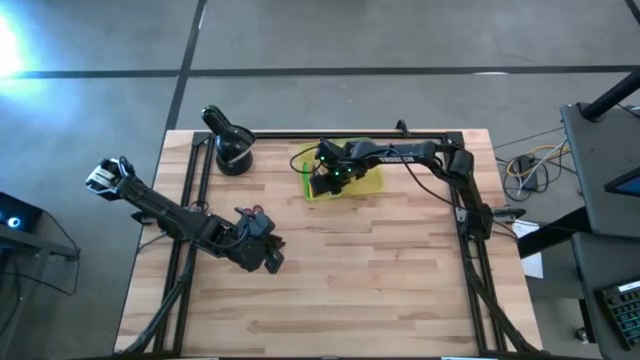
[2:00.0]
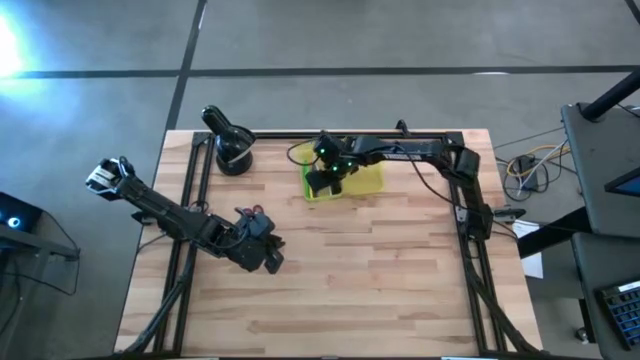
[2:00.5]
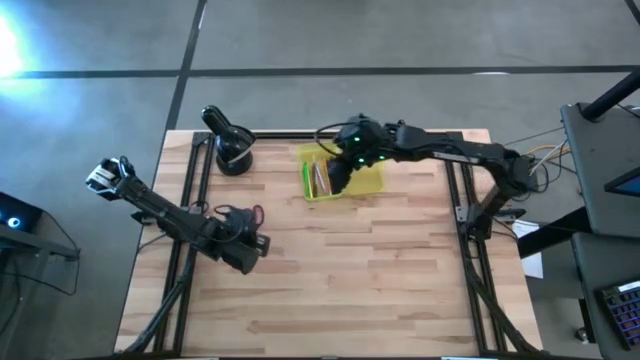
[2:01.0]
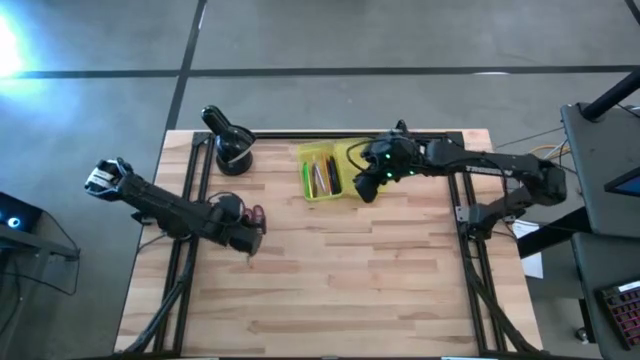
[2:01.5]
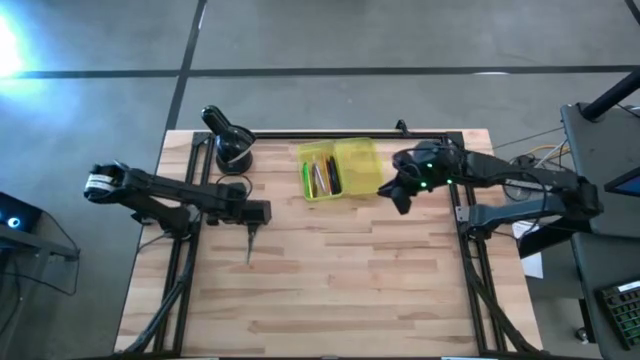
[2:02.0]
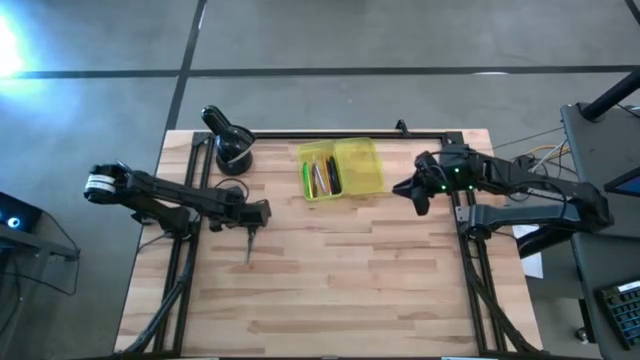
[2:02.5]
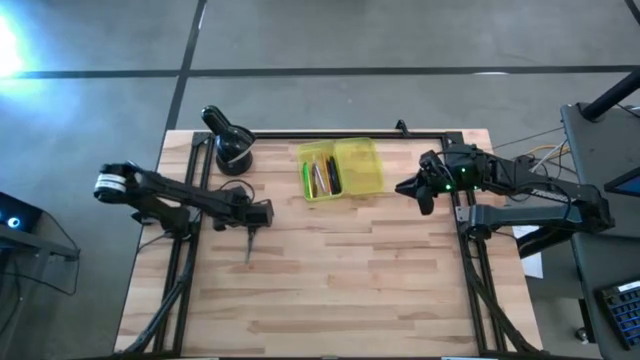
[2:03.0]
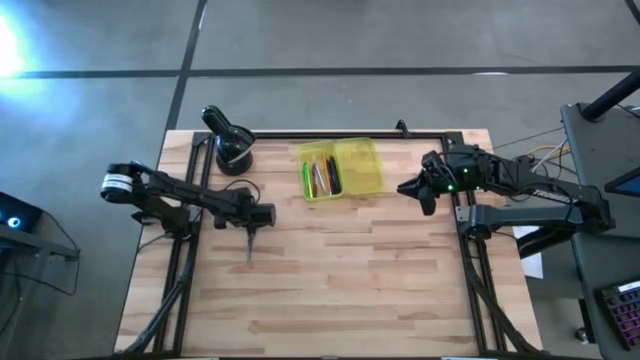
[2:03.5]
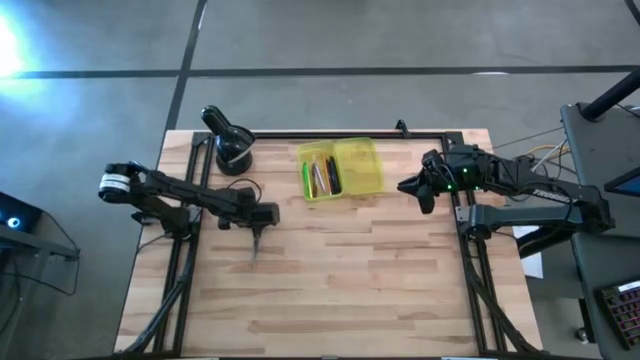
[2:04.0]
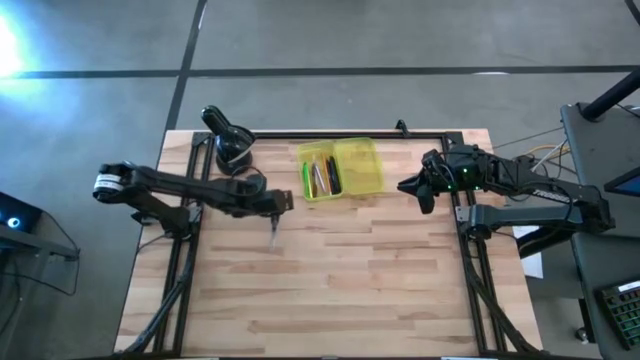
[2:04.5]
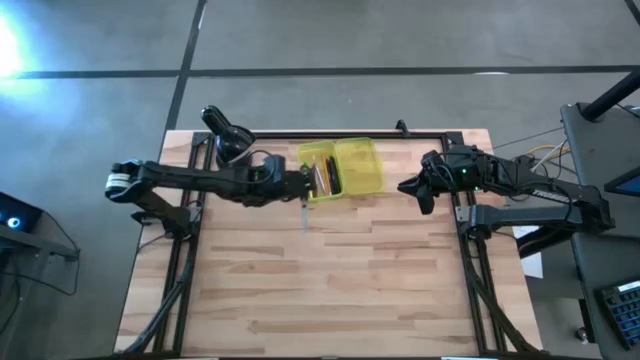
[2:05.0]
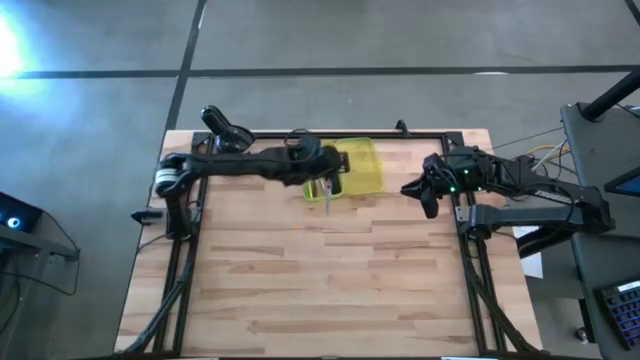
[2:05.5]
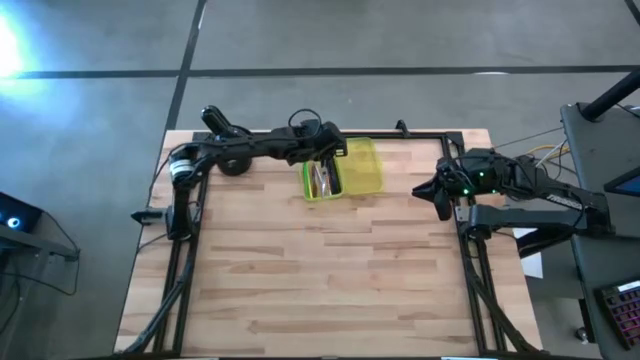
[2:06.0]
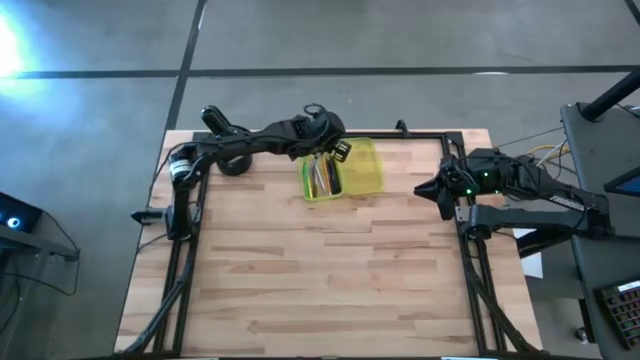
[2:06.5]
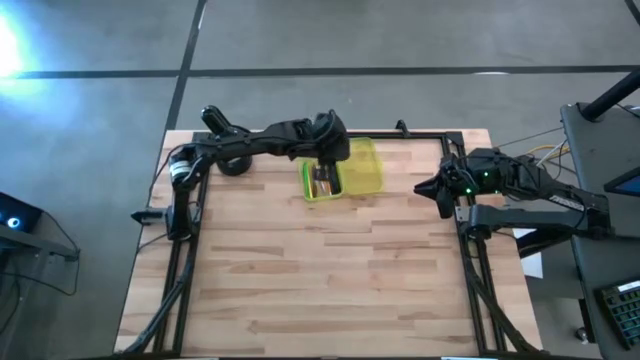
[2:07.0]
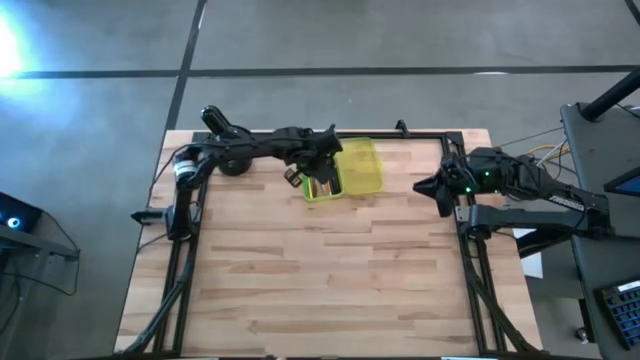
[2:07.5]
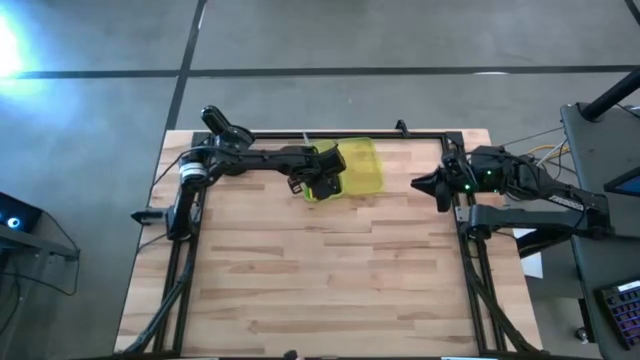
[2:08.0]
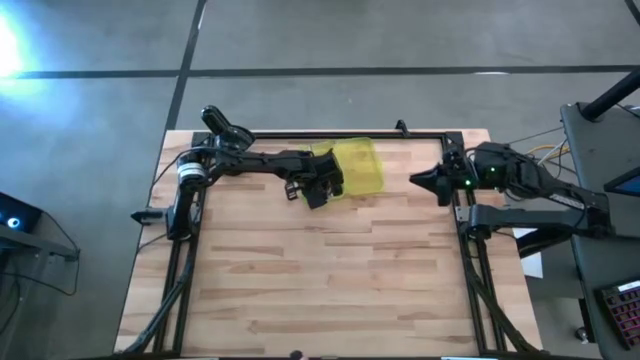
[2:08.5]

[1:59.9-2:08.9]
Task: Pick & place school supplies into a supply box
Put the black scissors into the yellow supply box

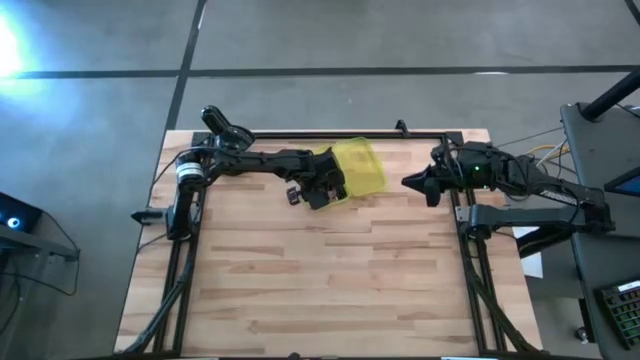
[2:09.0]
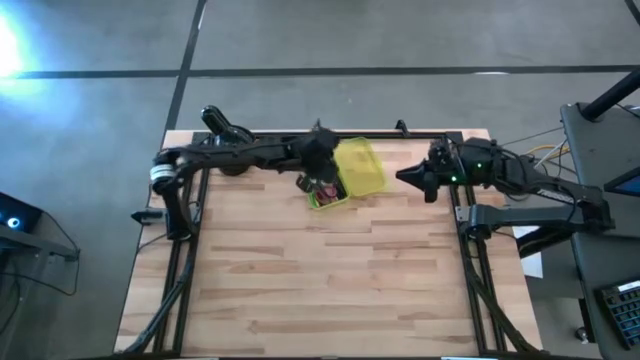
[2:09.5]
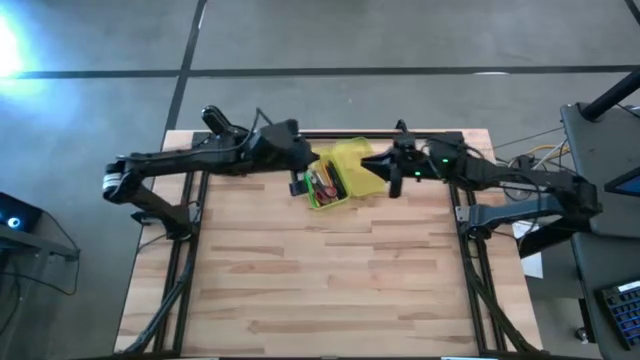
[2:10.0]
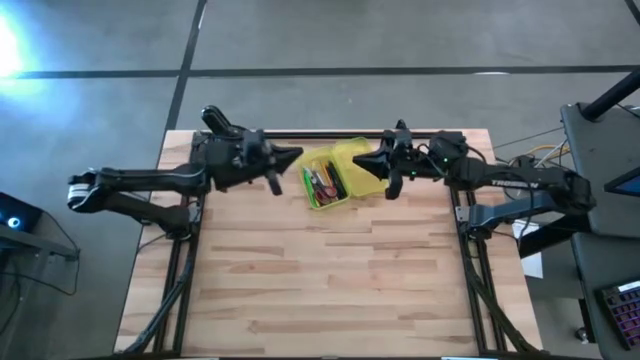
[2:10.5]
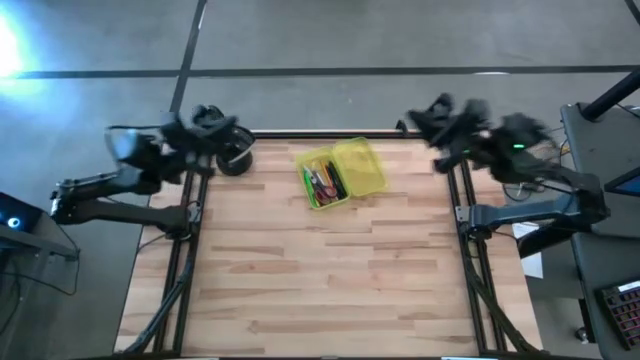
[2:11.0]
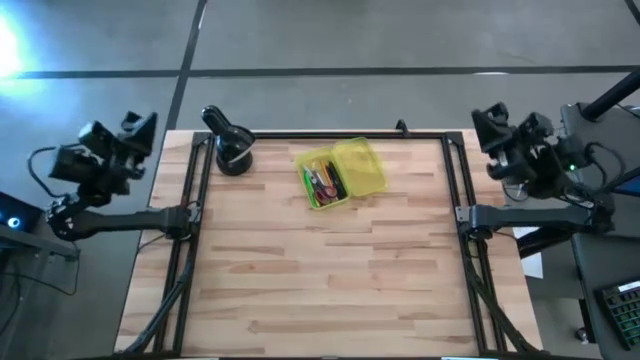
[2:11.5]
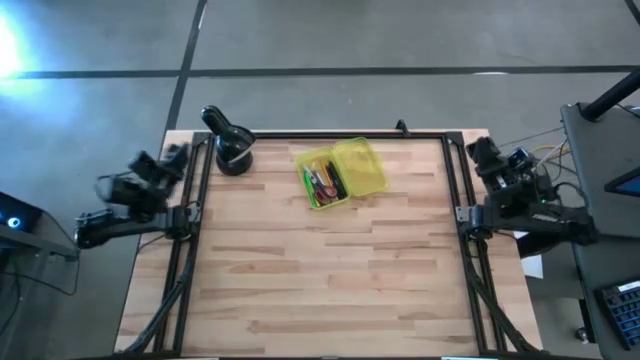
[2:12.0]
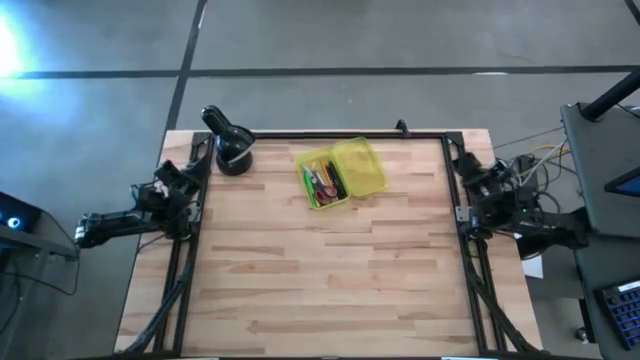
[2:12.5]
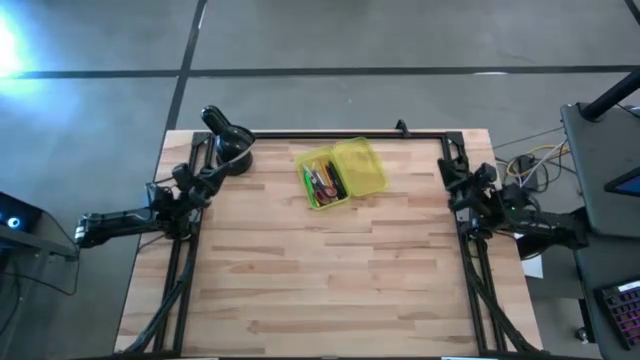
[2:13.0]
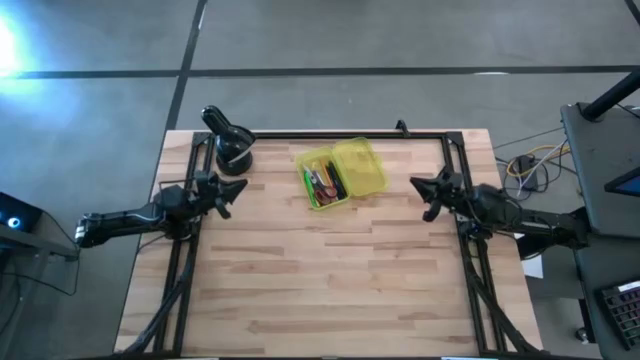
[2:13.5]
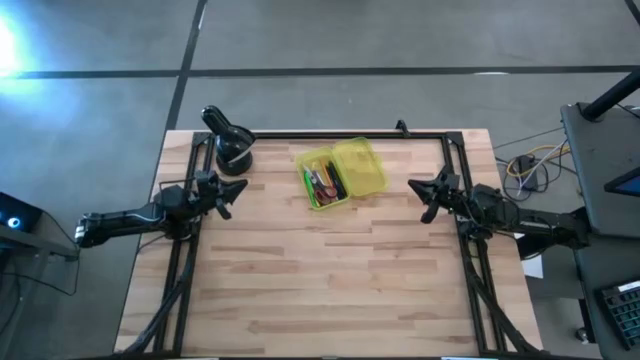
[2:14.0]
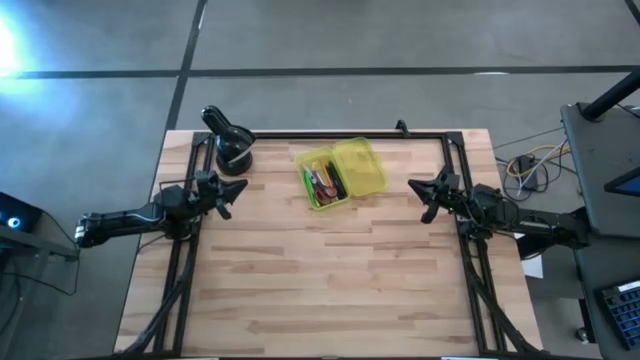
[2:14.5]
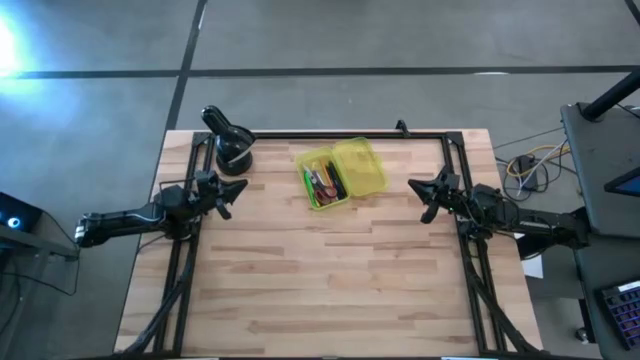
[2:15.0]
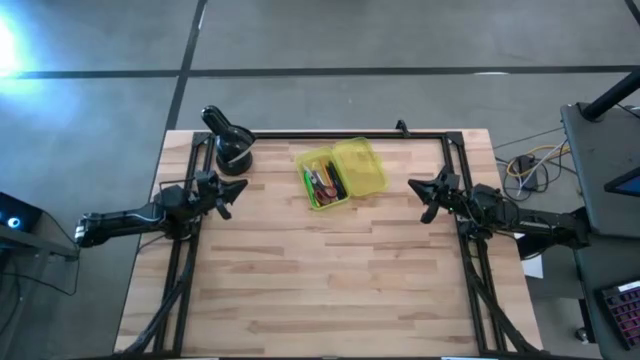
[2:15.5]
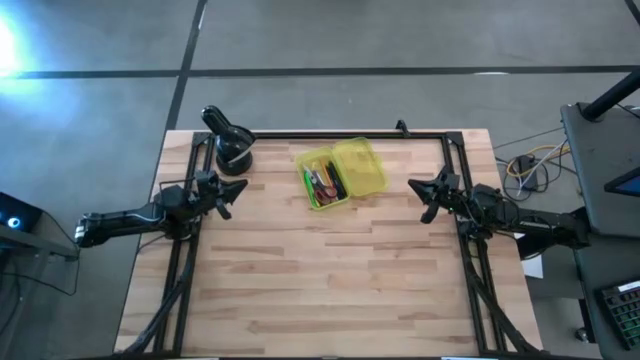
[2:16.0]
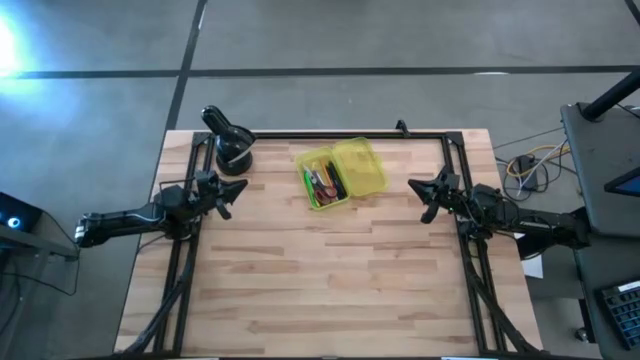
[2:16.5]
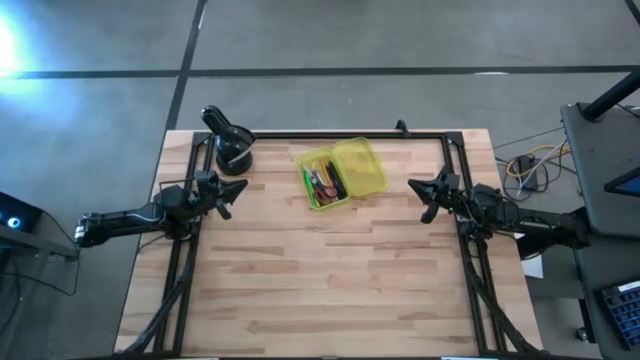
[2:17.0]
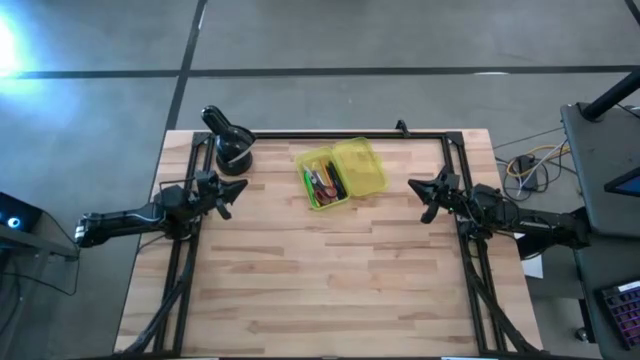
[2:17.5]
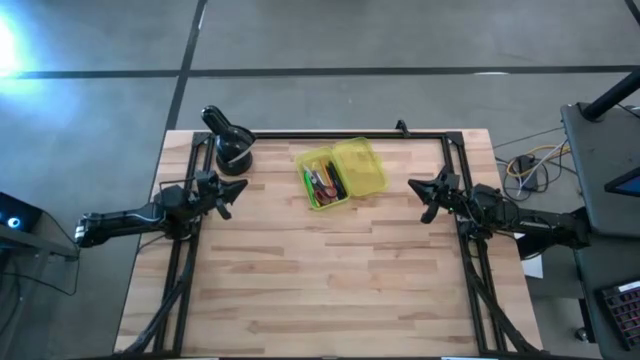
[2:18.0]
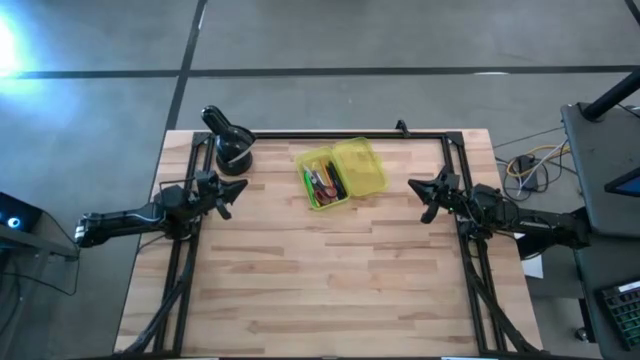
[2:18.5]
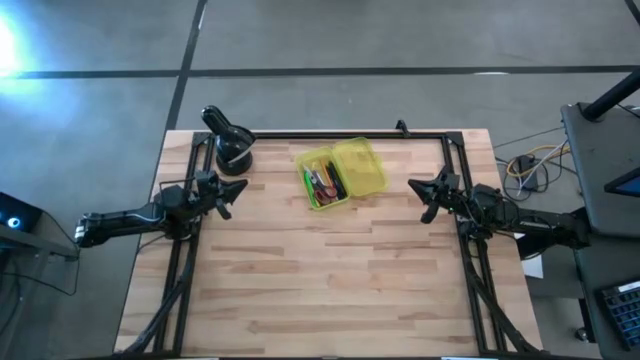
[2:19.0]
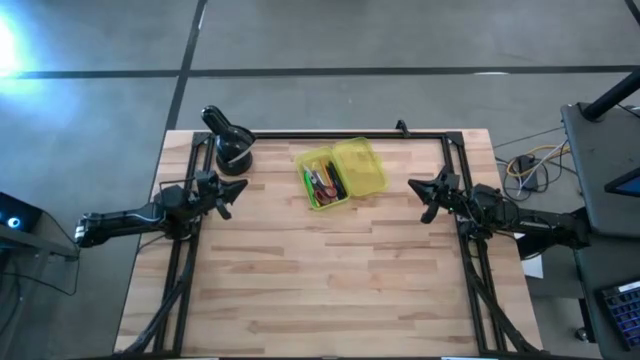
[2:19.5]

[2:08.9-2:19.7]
Return to Home Position
